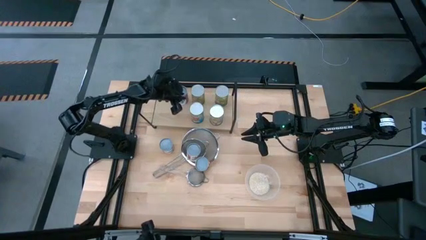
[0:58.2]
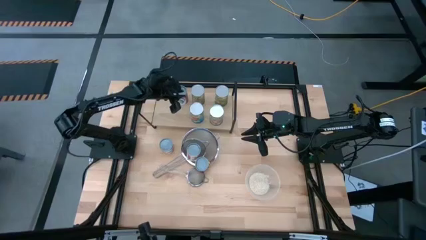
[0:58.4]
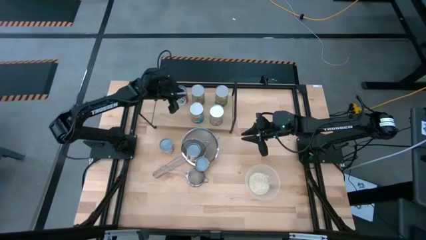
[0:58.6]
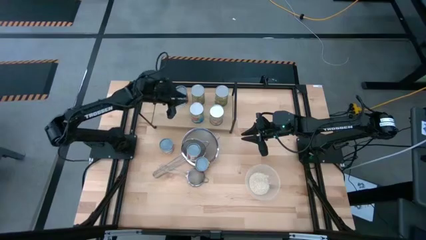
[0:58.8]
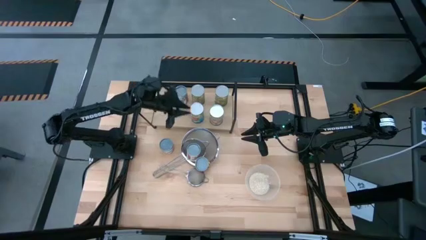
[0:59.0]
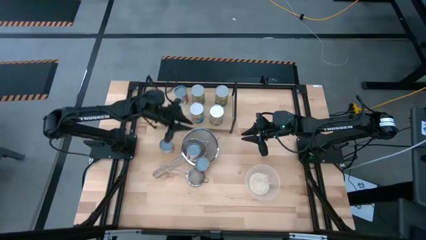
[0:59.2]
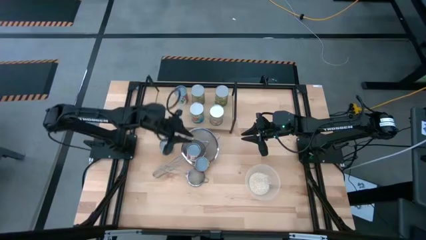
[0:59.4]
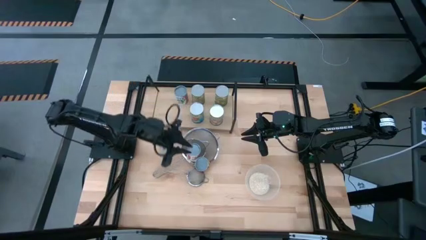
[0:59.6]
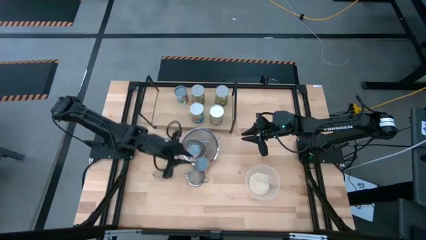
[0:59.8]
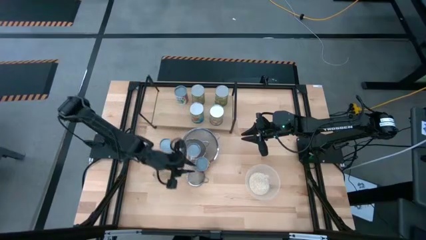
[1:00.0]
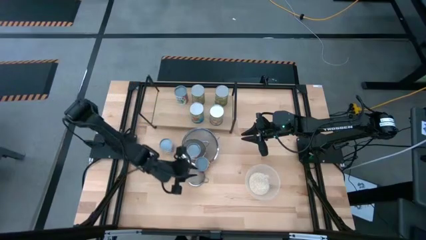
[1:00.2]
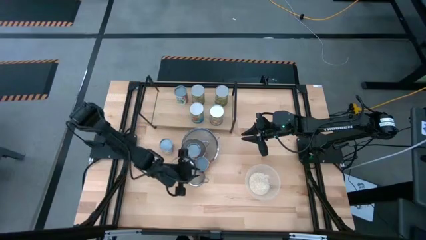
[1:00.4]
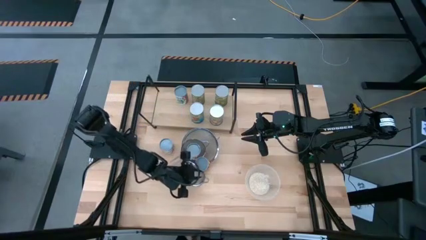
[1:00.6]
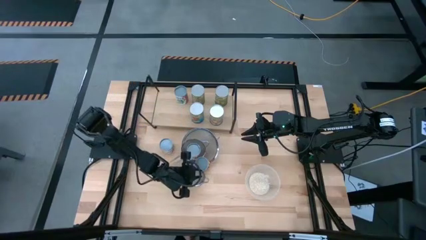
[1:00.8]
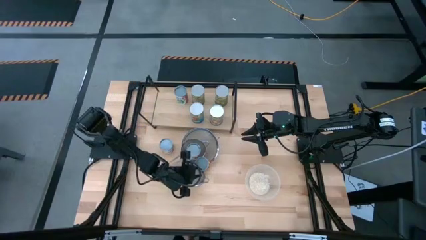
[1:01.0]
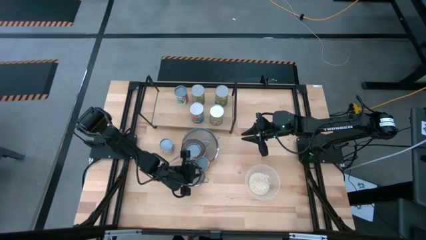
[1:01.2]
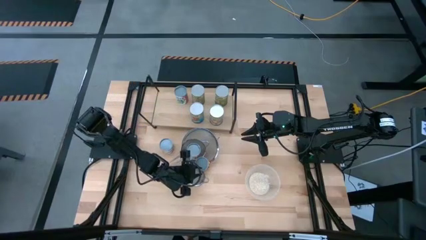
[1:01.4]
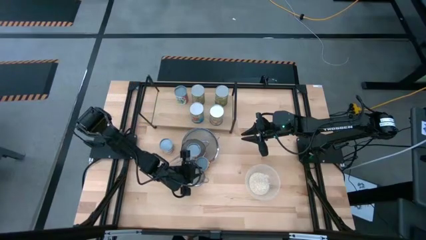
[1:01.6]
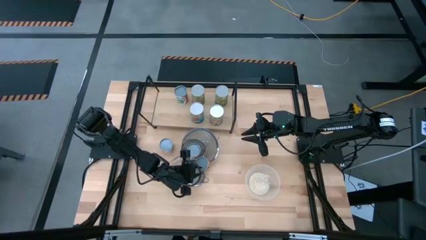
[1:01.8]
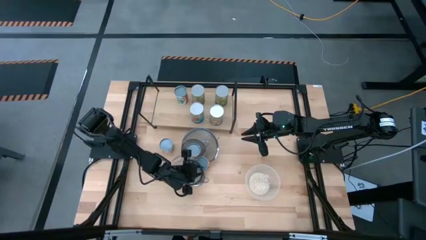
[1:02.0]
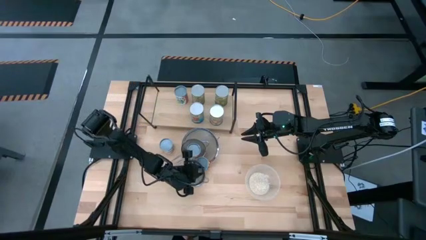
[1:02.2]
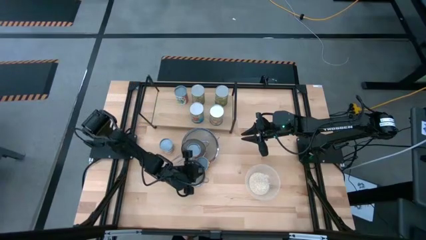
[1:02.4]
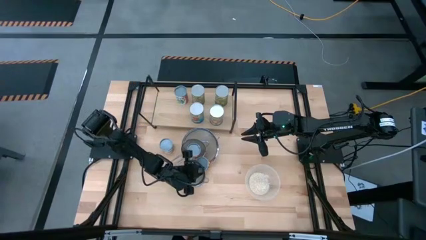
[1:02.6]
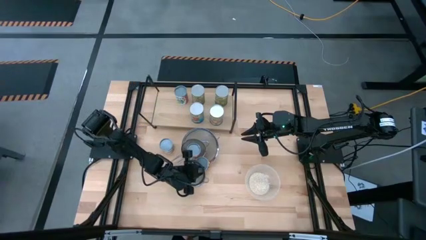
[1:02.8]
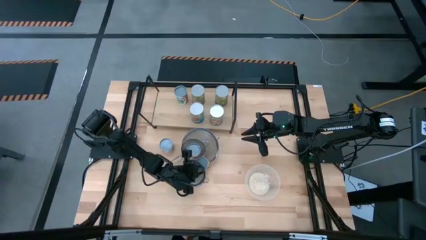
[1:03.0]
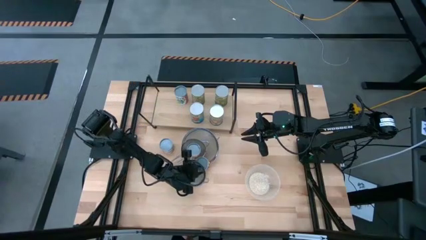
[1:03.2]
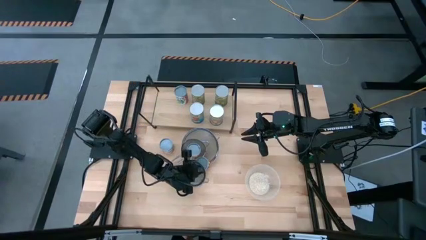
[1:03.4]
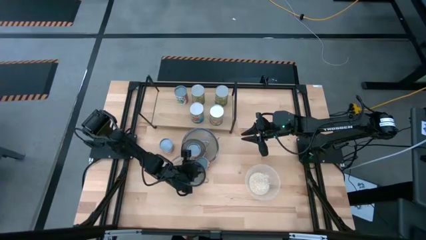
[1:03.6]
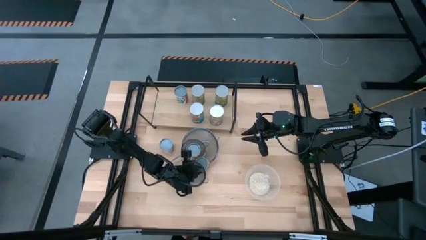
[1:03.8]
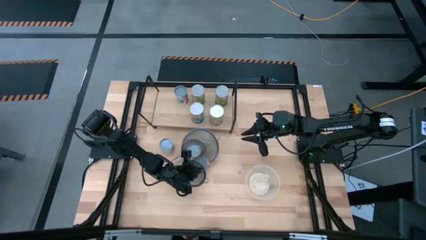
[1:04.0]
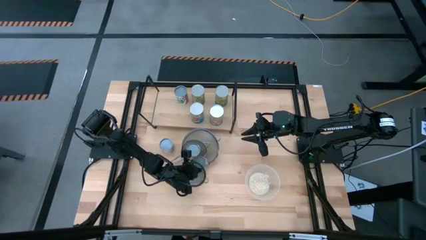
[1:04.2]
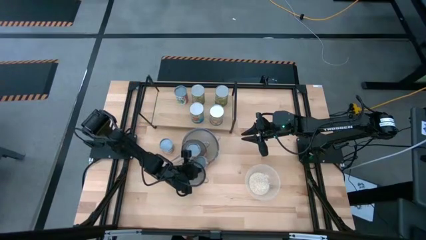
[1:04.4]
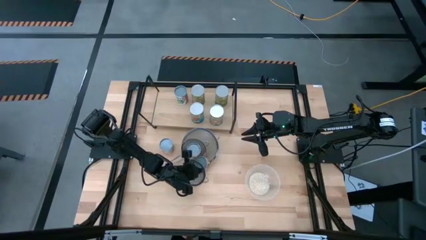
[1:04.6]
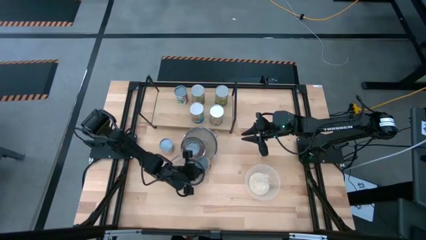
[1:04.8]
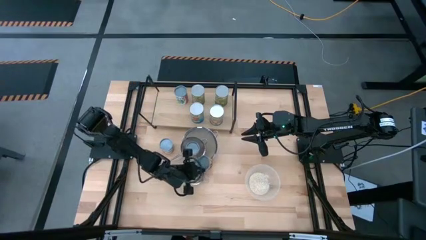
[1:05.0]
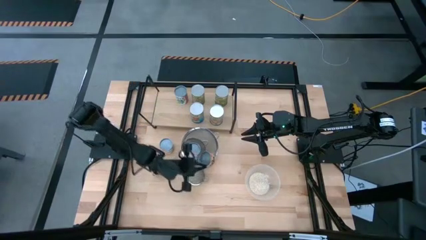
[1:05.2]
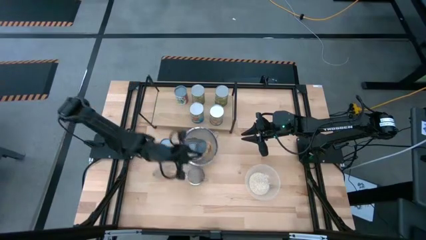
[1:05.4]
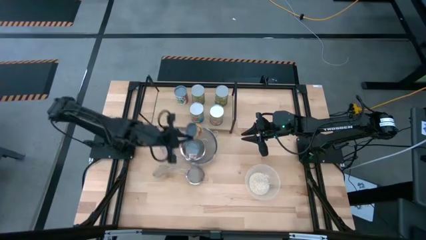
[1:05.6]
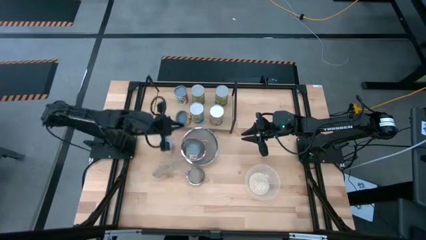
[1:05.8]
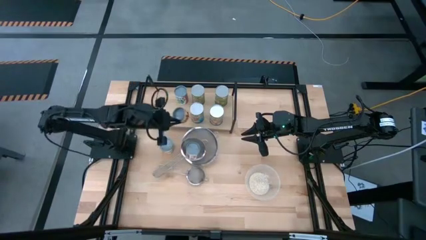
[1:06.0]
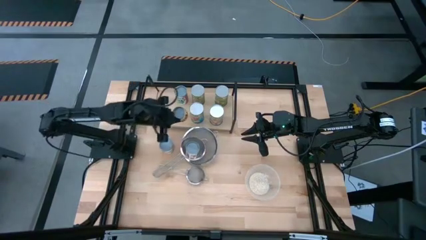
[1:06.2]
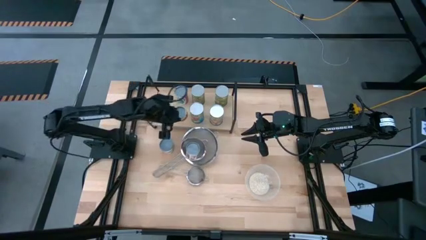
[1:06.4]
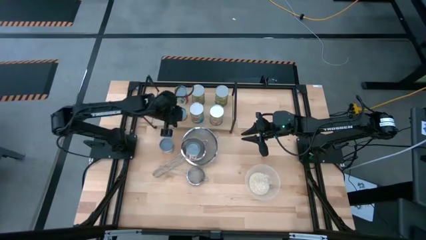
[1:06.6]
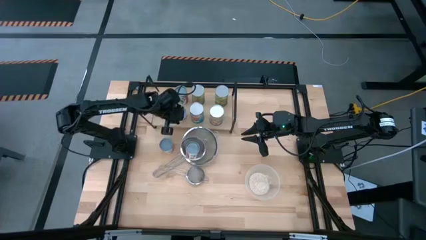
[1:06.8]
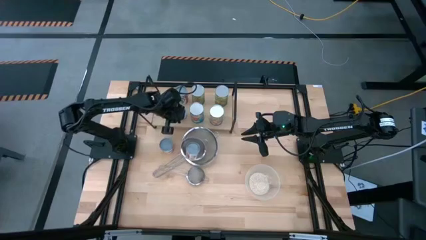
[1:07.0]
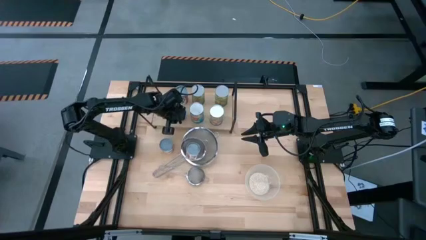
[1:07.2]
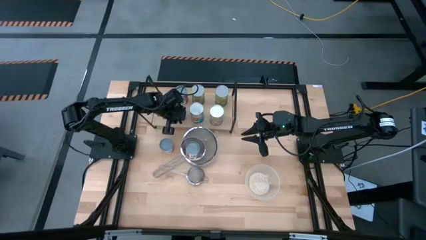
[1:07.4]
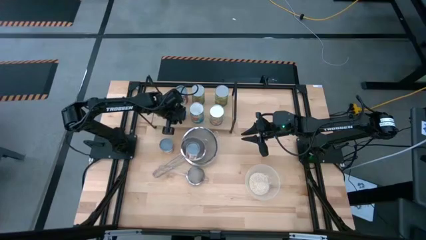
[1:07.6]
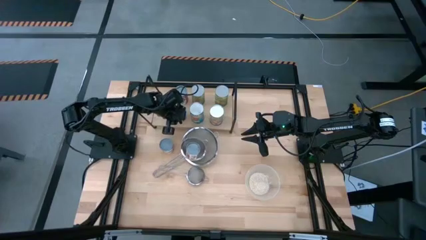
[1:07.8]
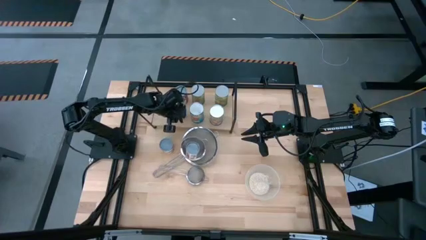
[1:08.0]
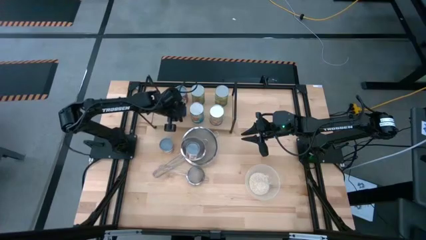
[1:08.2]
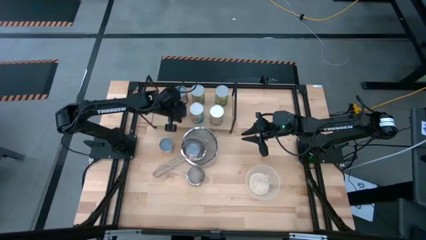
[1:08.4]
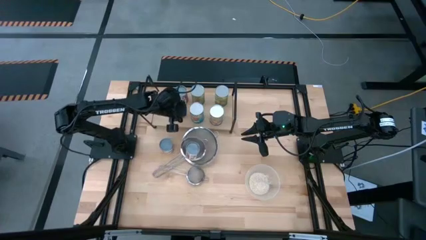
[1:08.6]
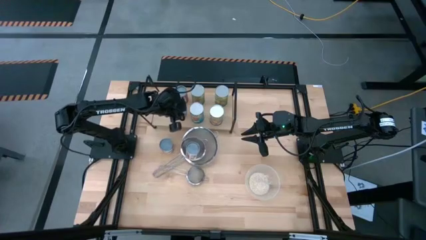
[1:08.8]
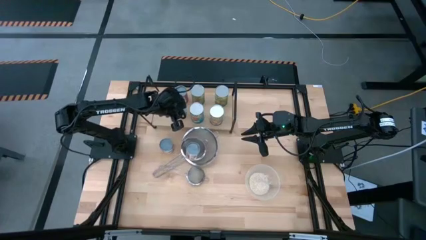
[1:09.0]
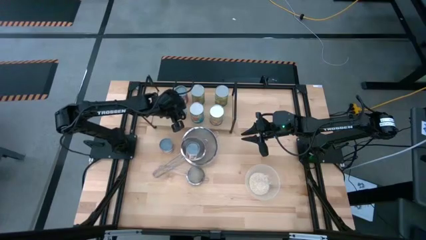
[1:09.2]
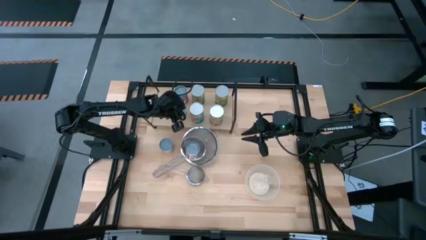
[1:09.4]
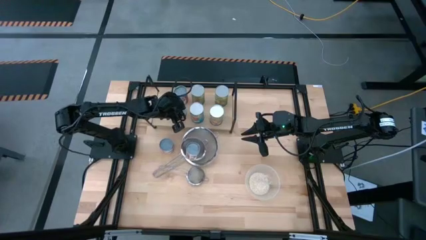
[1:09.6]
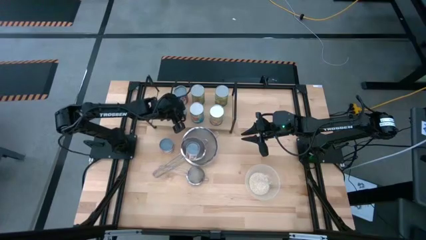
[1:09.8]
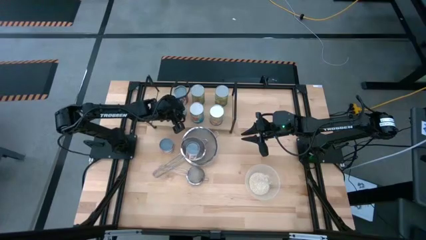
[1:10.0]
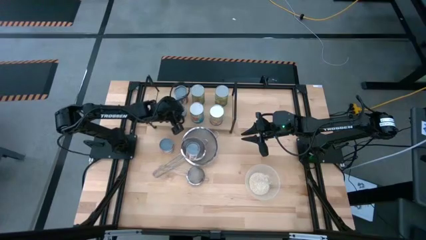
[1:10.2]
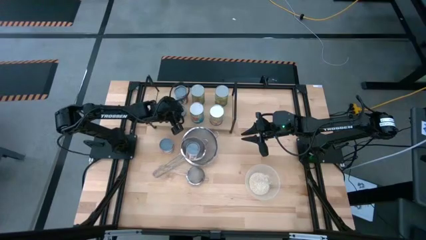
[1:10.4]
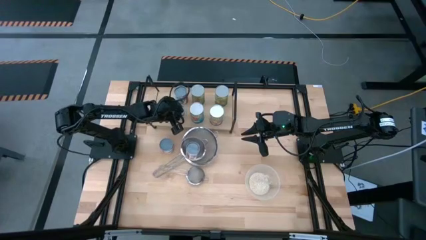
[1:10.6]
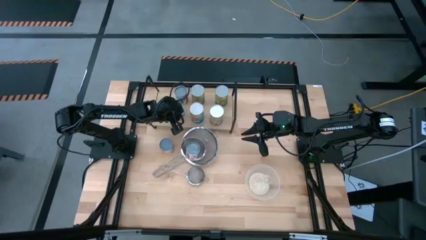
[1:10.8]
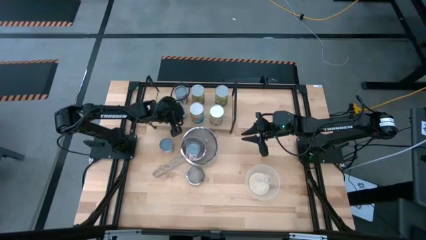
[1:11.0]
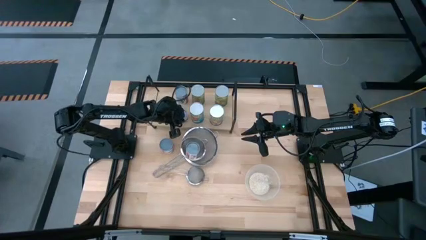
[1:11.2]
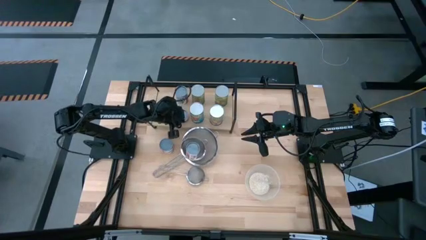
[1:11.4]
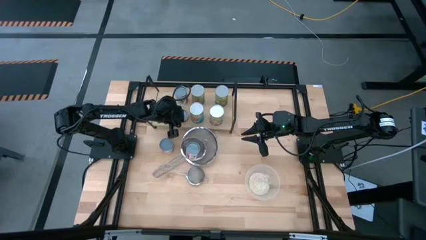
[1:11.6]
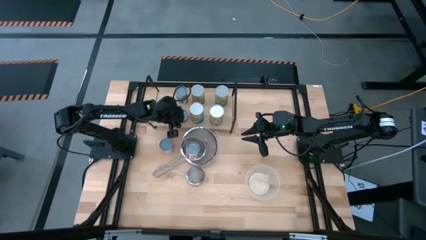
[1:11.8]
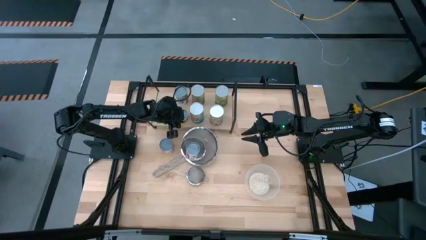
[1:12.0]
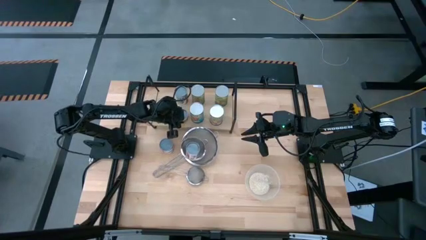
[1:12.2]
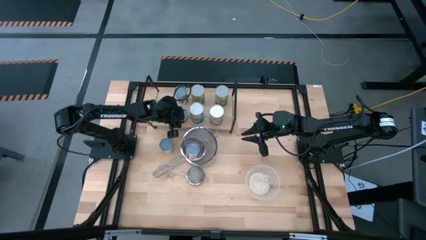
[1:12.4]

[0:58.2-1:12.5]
Task: Pick and place cans onto a shelf
Put the canned pineapple rings on the shelf
